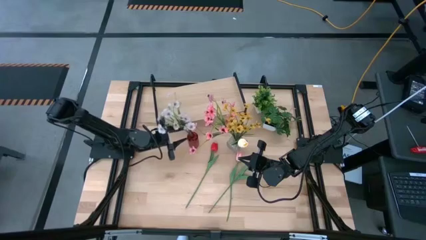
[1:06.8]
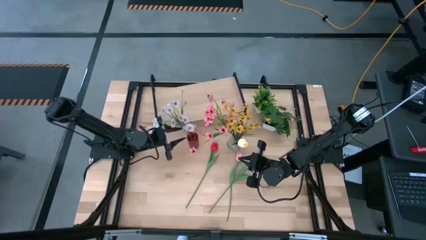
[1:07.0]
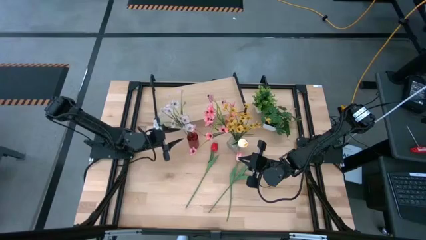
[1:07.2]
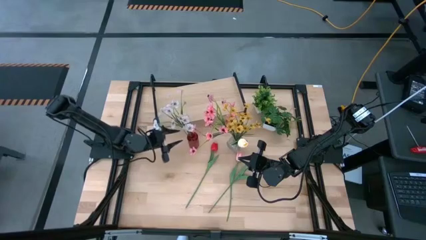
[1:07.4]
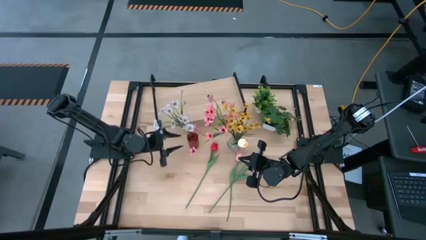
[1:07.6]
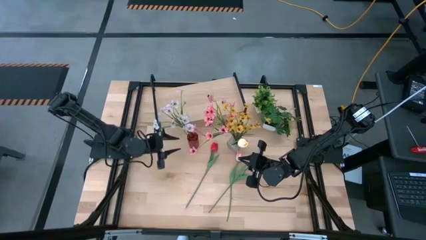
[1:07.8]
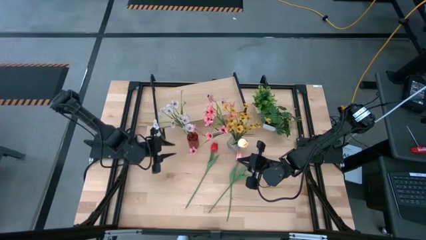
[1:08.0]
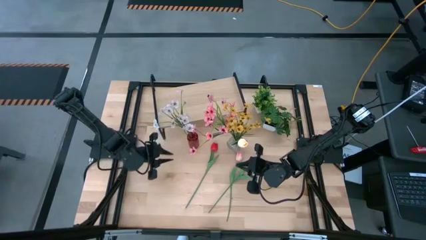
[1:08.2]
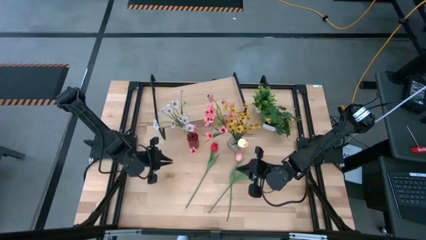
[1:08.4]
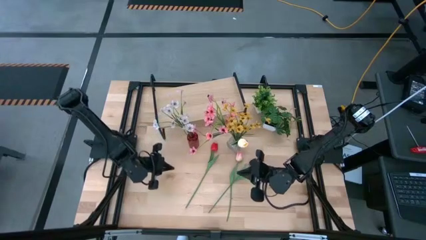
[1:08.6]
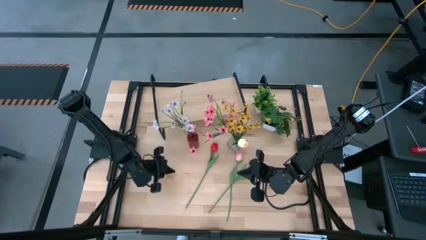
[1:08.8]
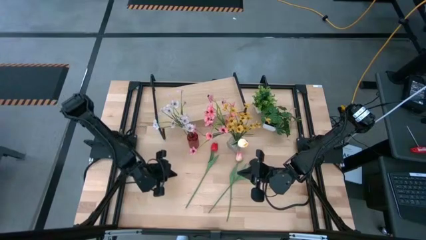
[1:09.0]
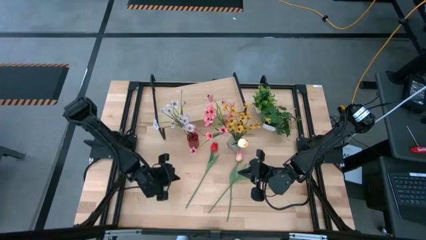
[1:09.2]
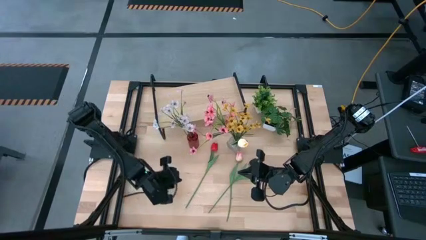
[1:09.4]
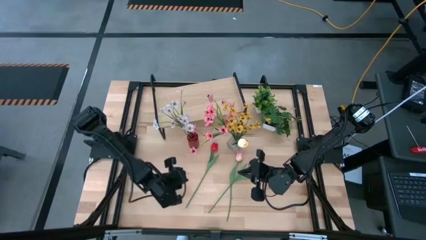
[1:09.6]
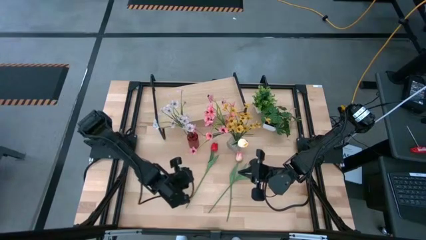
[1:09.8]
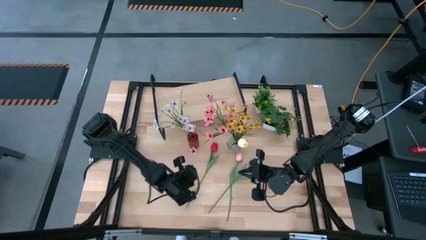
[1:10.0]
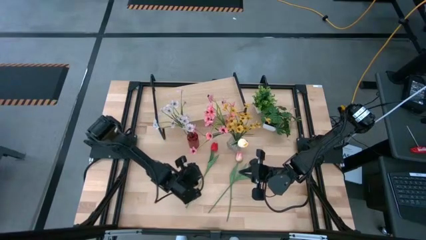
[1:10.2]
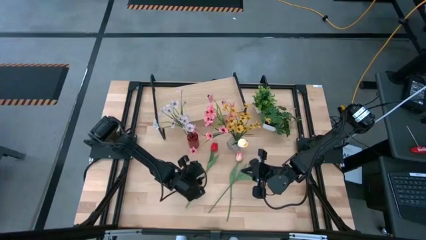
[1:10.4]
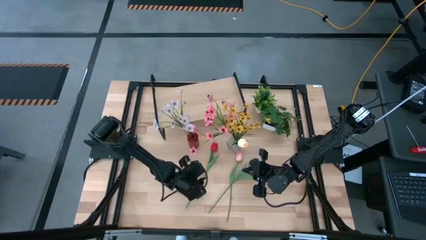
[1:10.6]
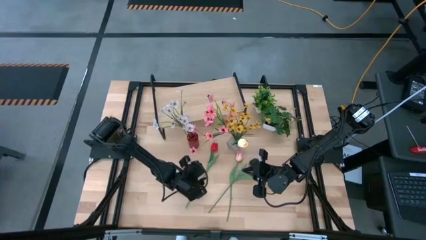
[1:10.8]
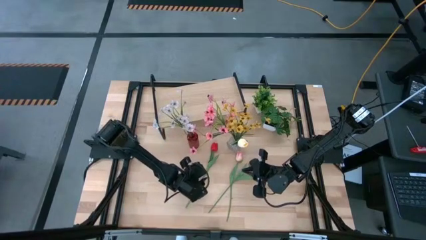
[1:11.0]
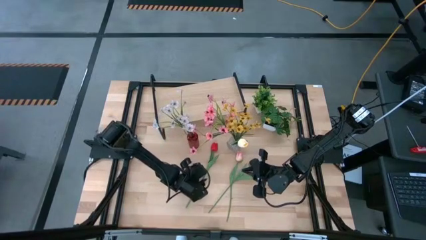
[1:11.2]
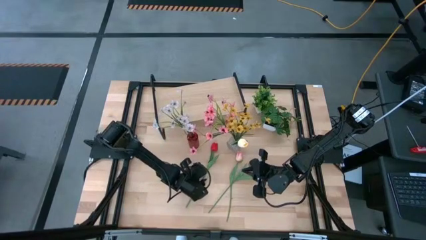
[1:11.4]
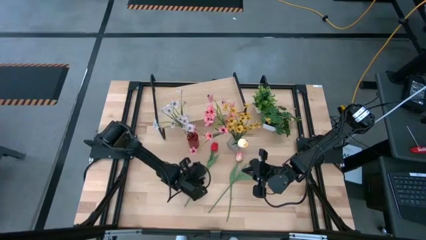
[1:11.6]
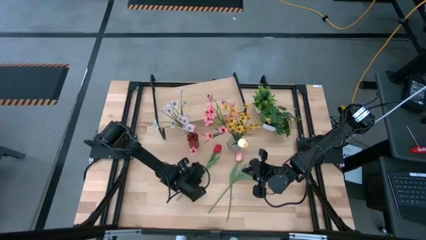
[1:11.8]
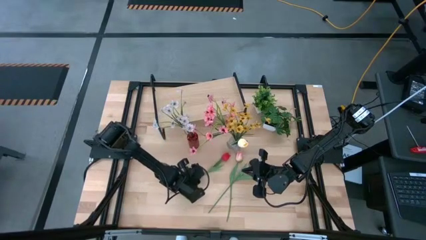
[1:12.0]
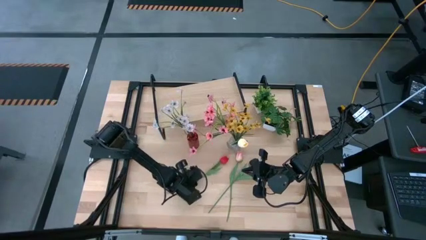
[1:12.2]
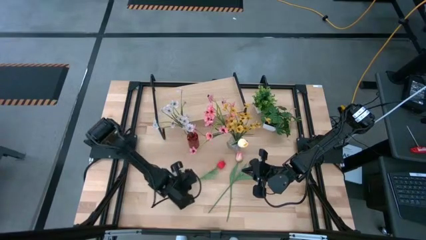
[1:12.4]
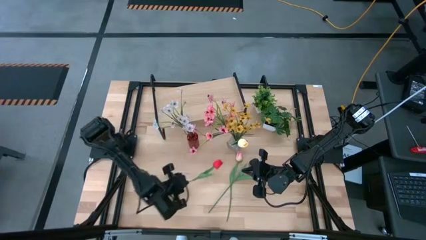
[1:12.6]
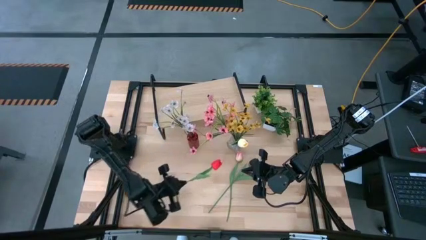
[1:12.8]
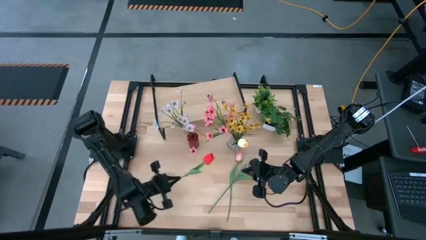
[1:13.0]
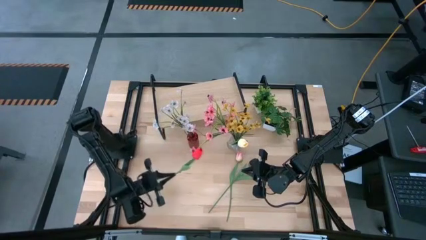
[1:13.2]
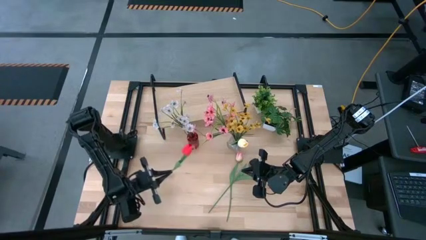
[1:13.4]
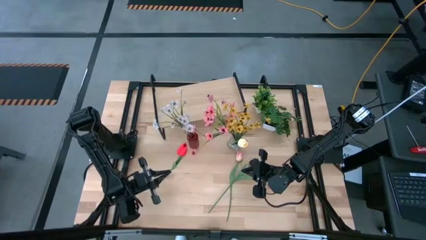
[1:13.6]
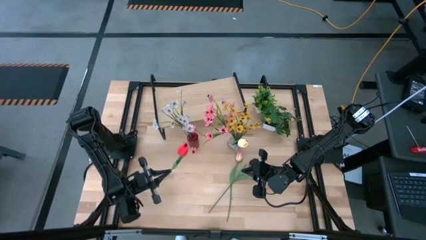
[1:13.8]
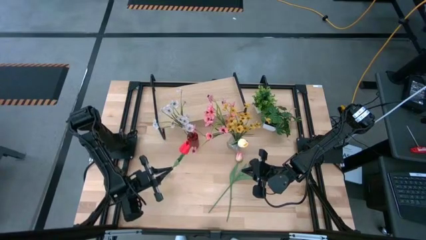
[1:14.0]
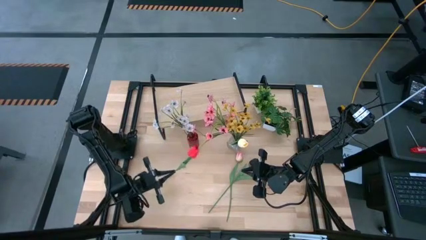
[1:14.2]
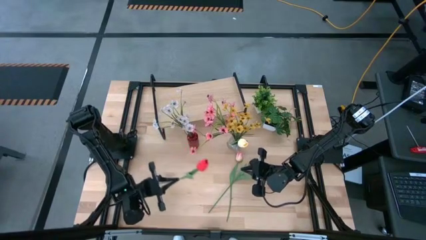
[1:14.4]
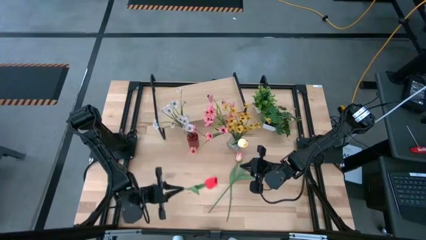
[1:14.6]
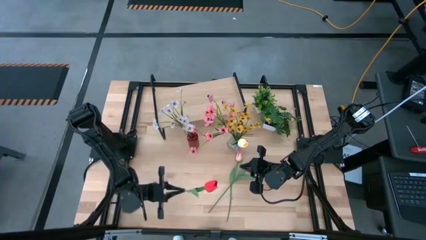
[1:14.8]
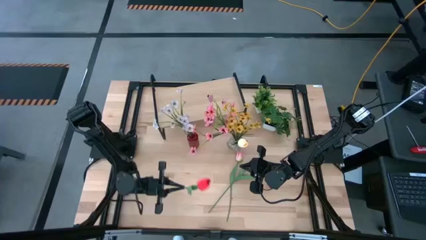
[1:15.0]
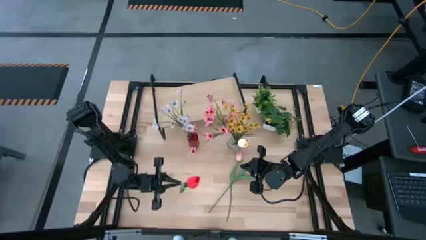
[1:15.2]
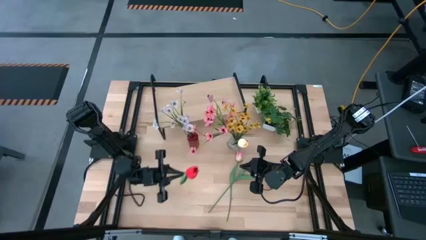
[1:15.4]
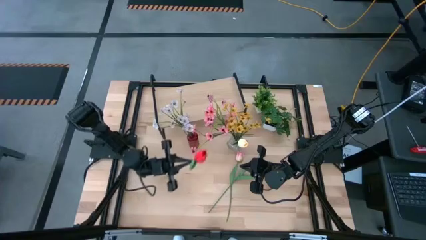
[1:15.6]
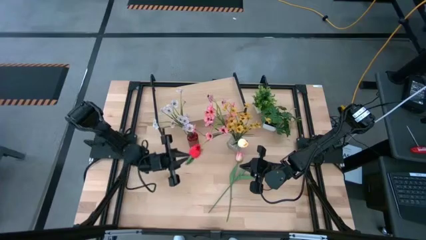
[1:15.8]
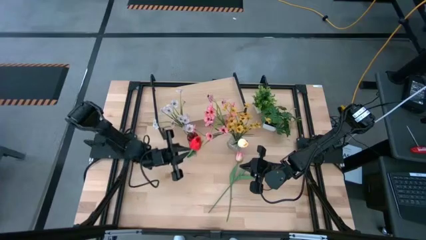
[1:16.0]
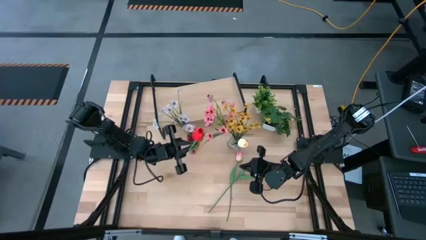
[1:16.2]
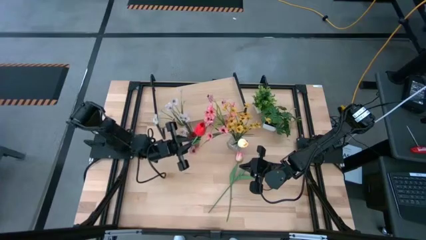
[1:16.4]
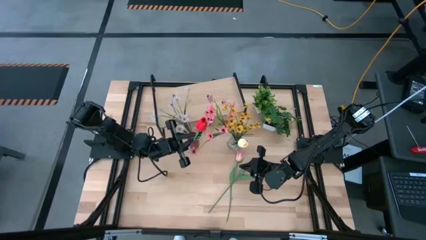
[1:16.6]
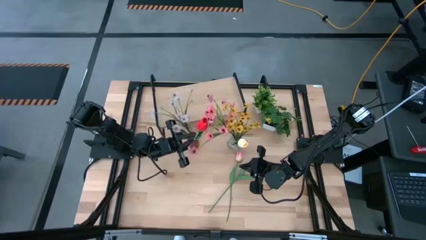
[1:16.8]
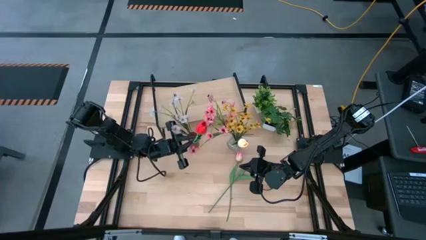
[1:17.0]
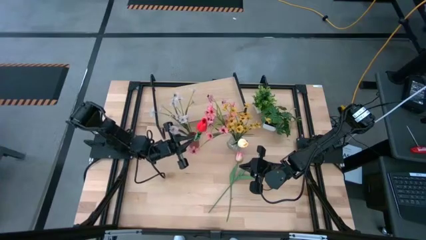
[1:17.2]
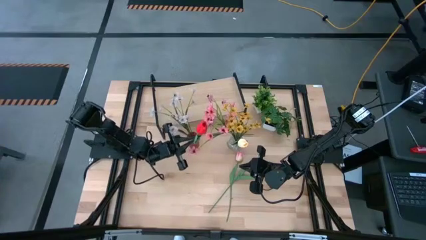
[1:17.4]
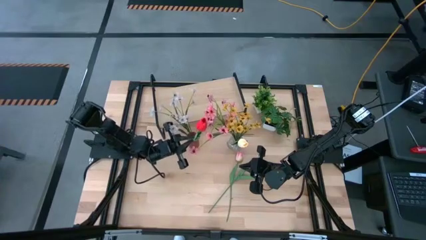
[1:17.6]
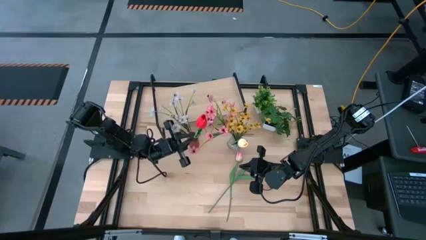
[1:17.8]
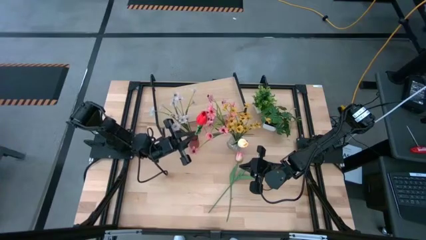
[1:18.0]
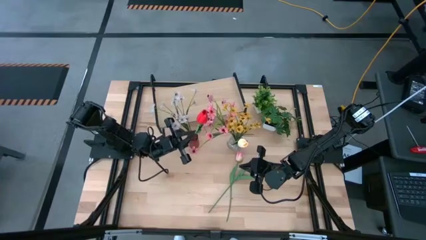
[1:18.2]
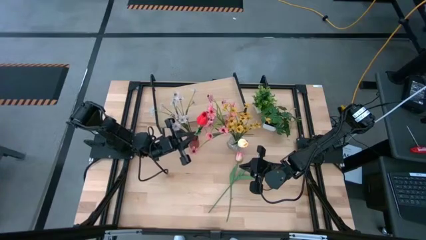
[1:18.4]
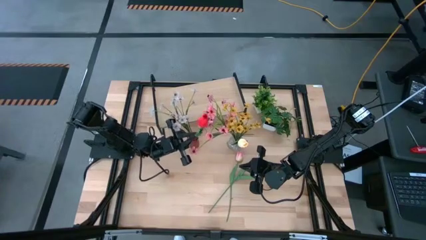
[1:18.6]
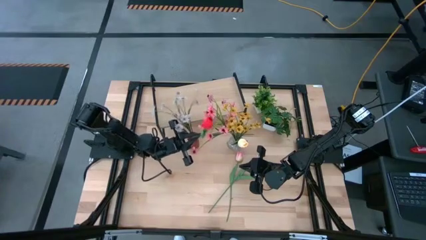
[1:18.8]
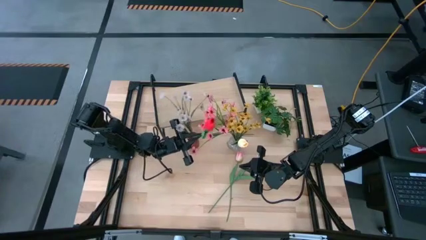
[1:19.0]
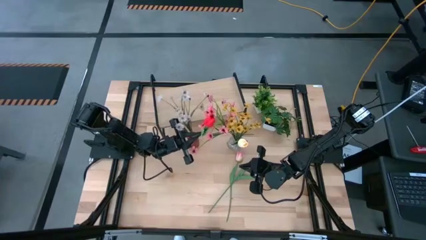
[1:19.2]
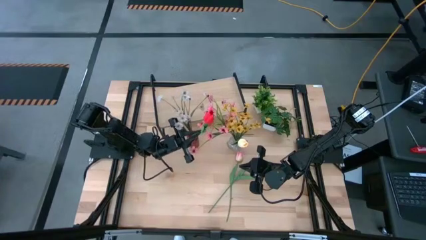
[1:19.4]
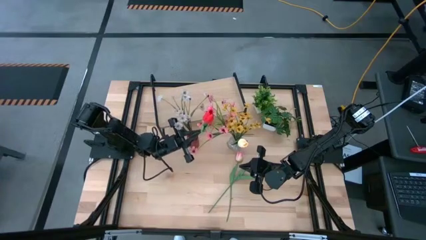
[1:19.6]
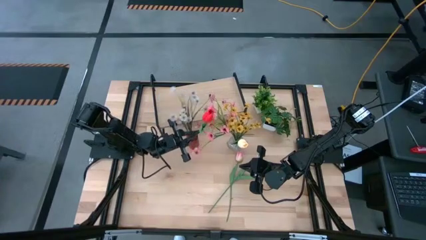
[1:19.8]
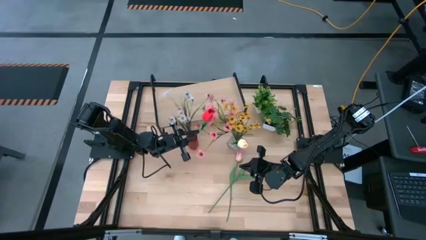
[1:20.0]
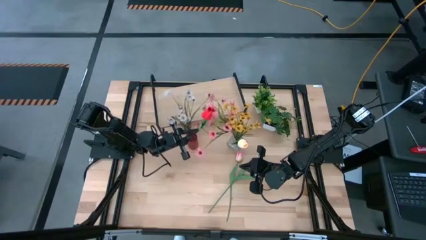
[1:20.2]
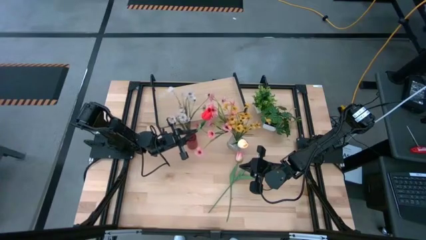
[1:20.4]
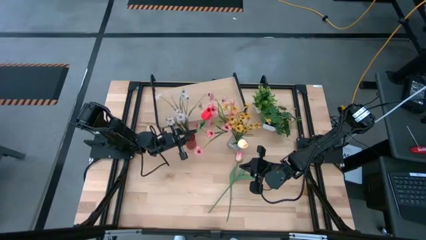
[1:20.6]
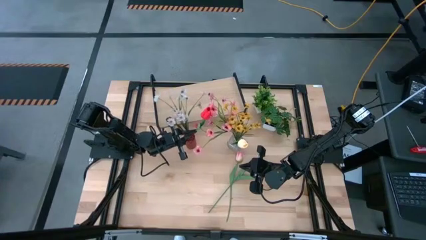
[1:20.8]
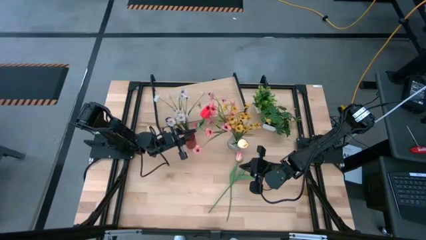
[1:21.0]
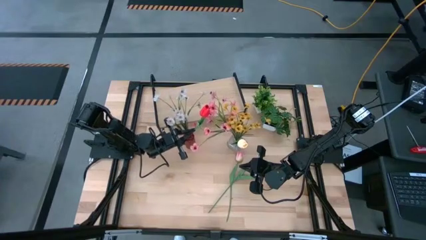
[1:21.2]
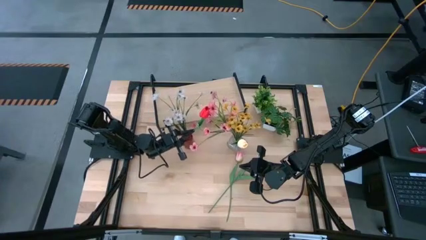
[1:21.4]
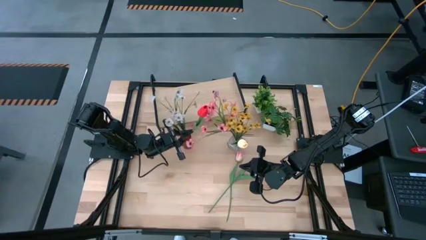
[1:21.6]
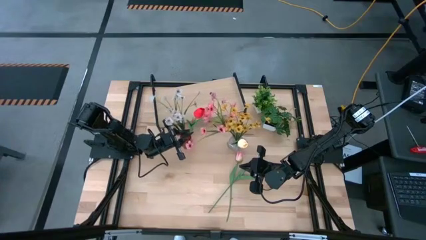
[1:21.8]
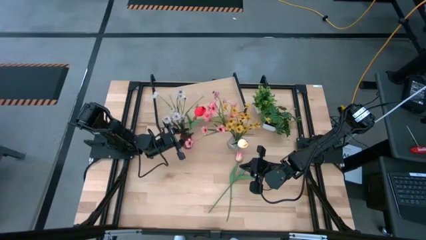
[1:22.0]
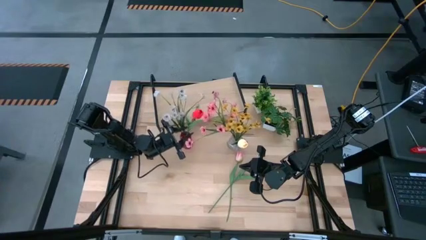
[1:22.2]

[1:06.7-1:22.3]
Task: Pick and place flowers into a vace then onto a shelf
Put the red flower into the red flower vase
